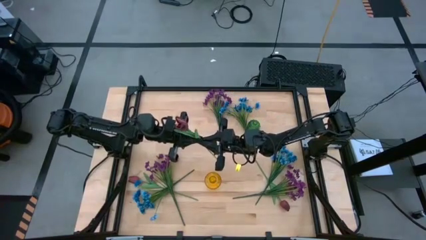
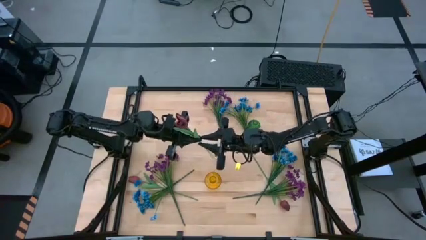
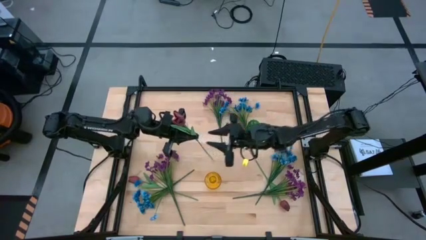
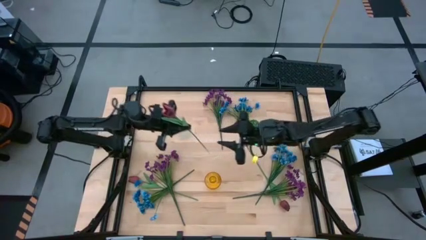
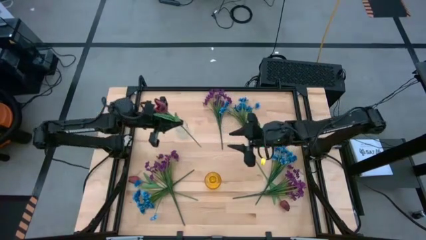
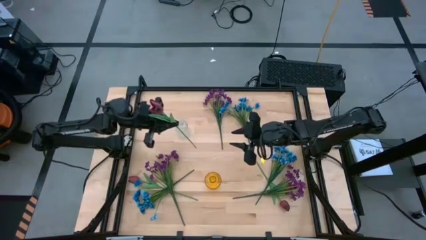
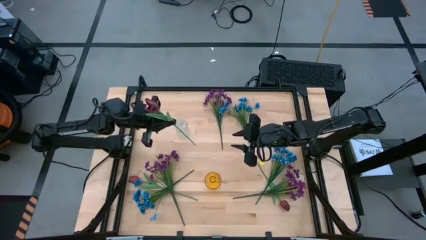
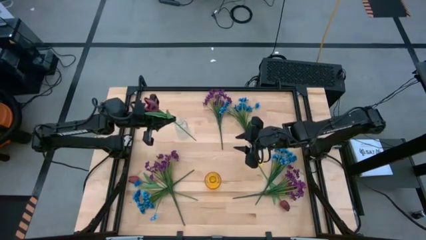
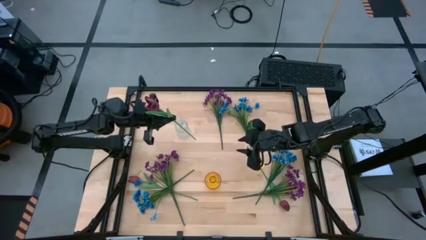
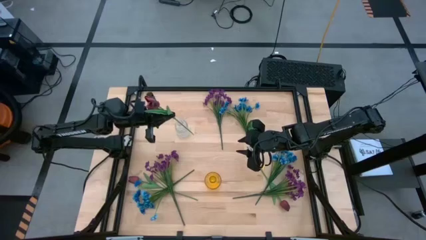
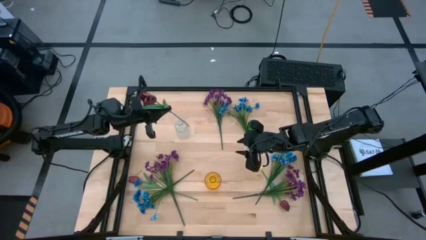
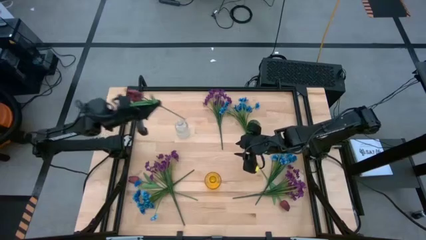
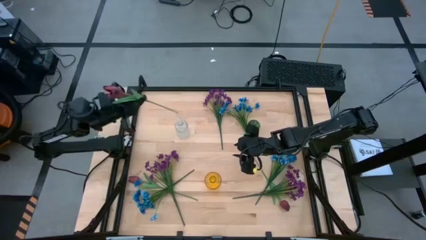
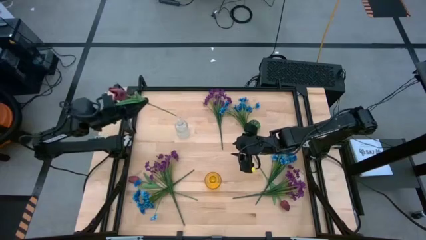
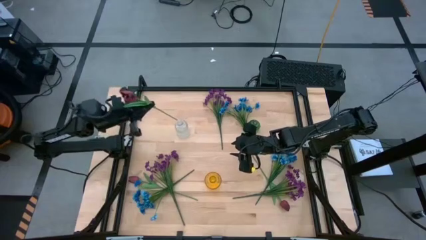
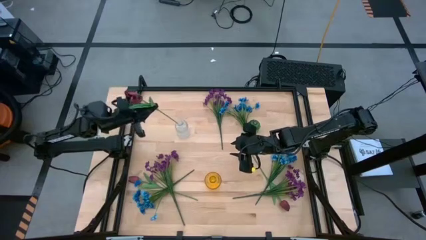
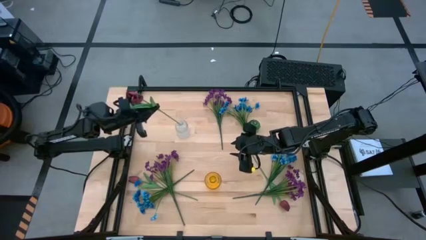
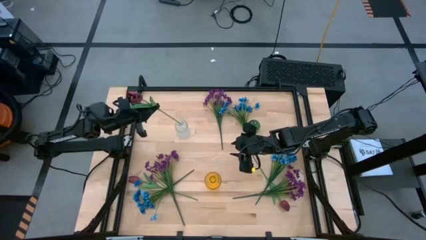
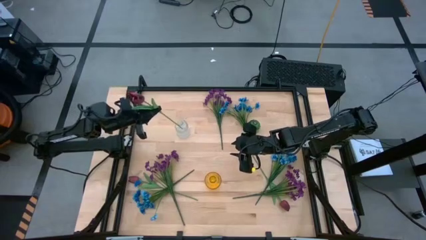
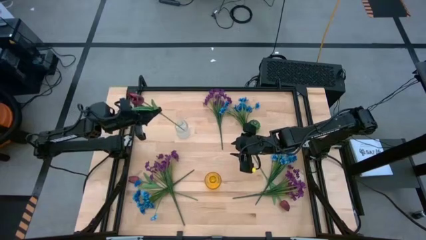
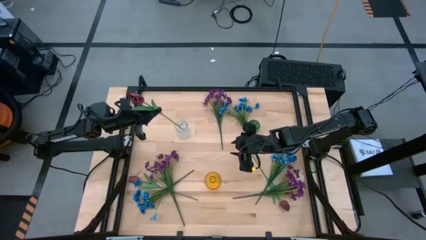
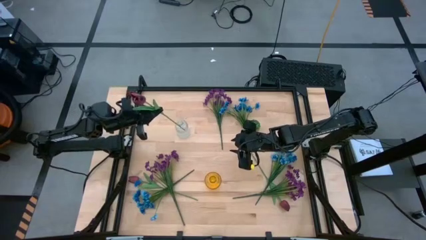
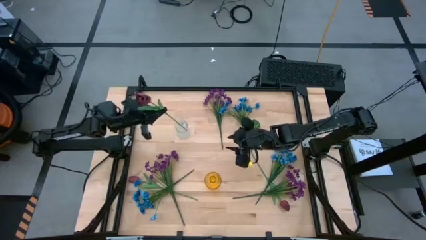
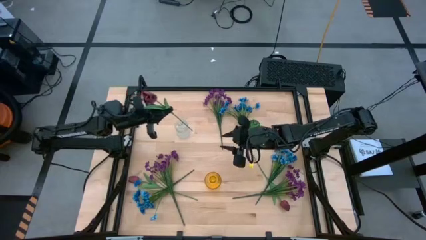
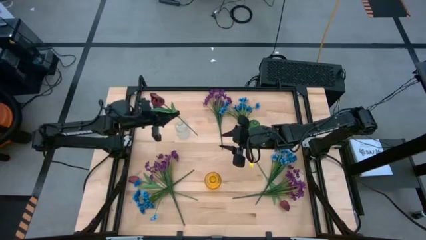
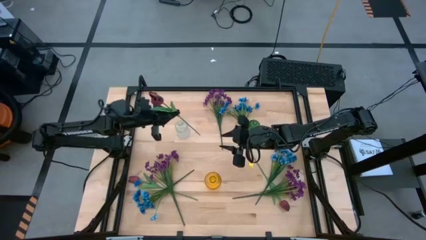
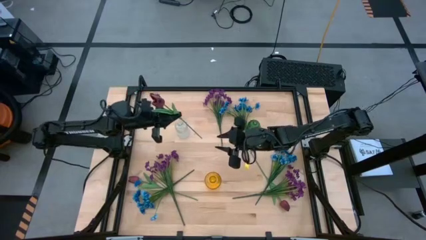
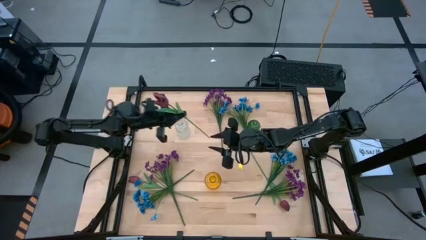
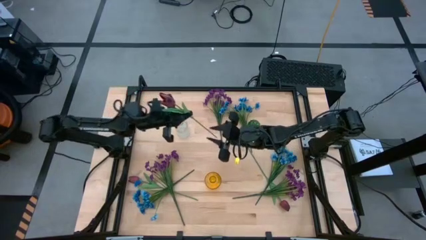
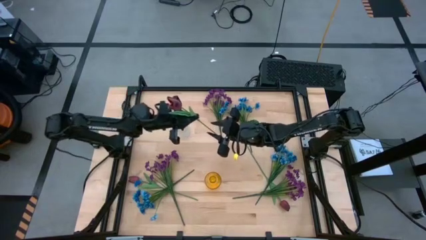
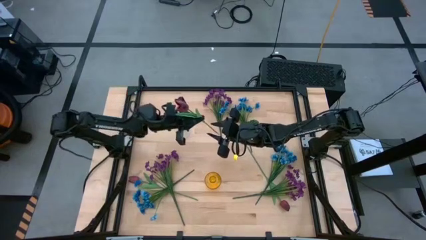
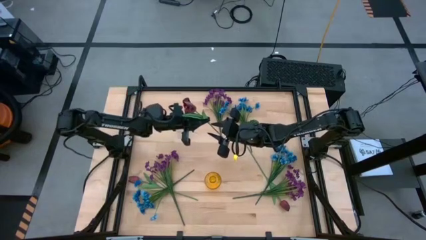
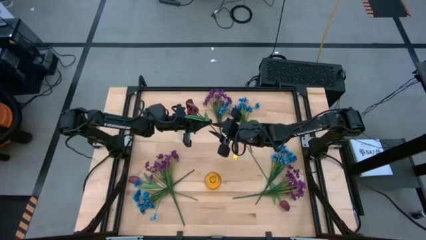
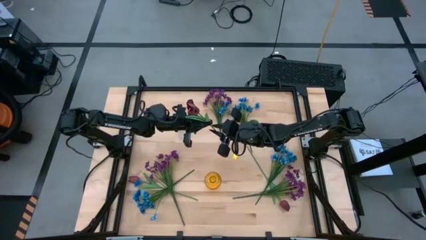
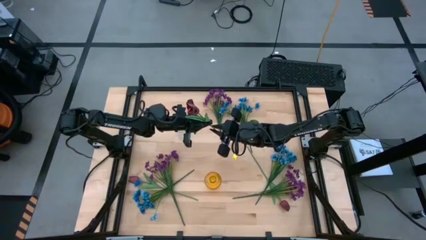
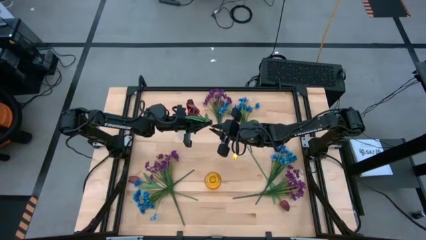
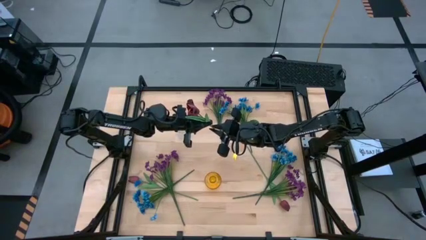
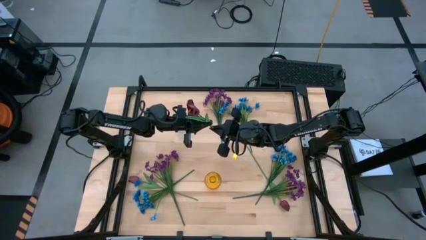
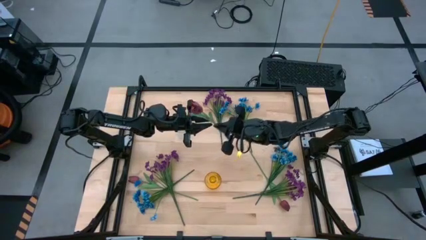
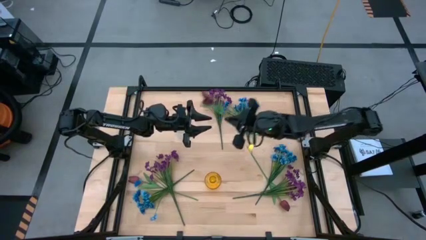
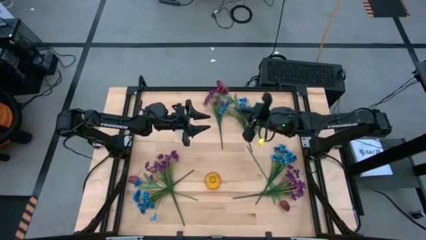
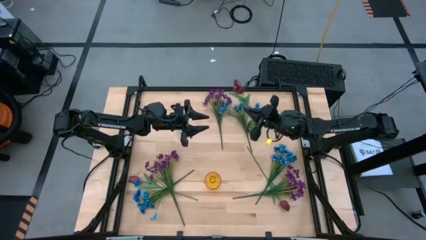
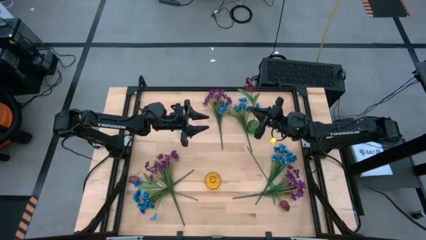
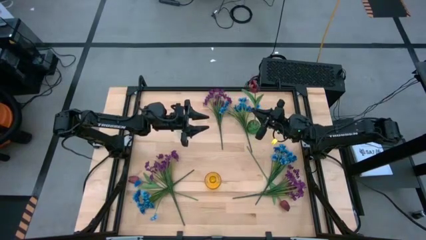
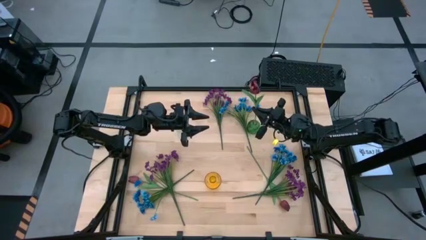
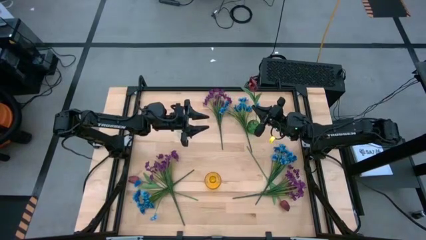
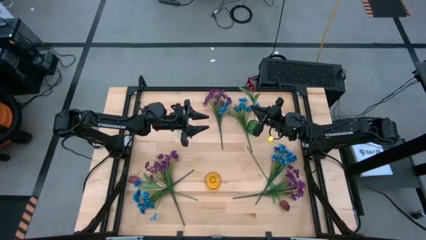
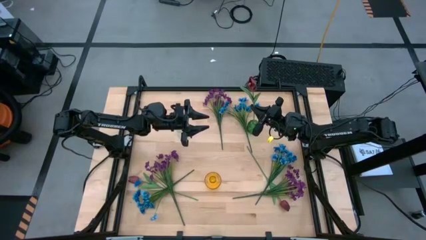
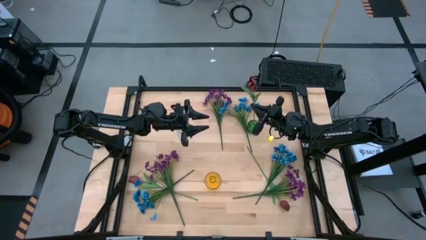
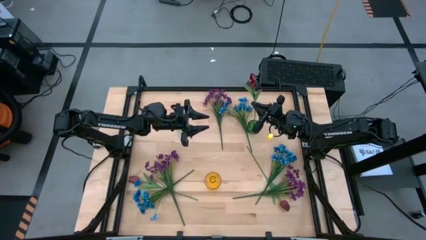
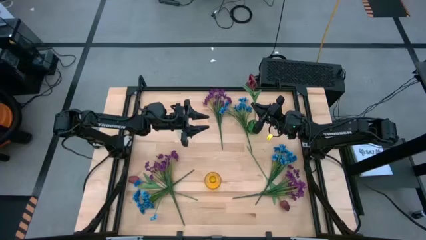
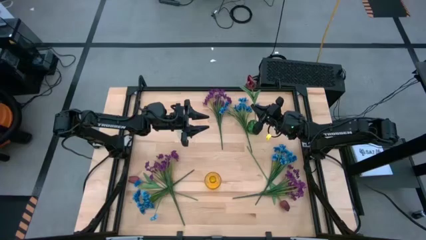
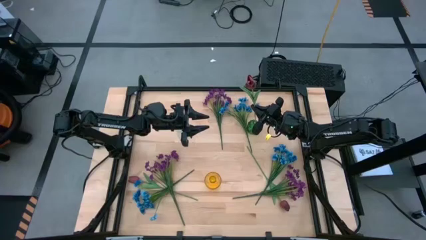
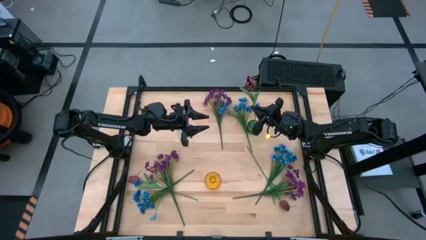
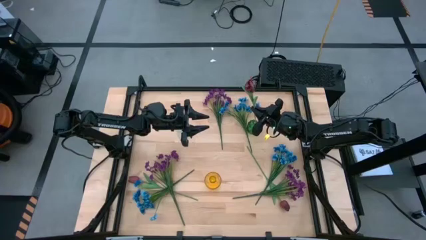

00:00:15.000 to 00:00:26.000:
Task: Sort flowers into vase by color
Put the top red flower into the green vase

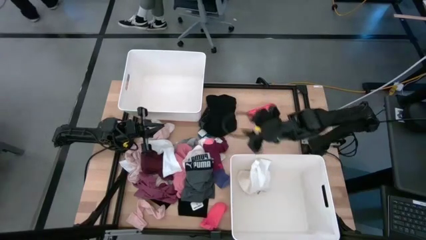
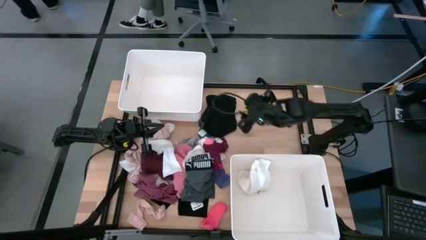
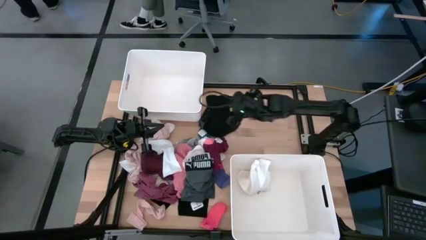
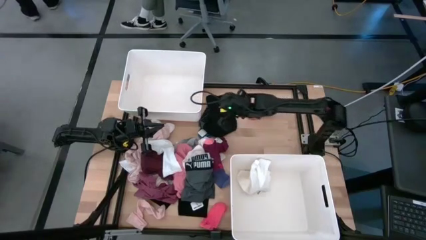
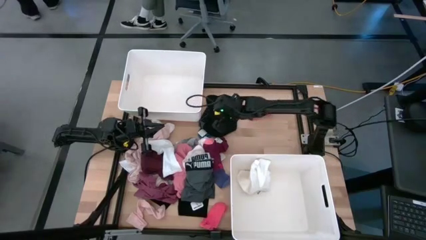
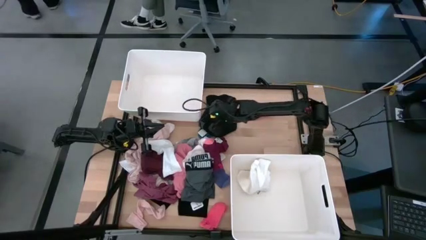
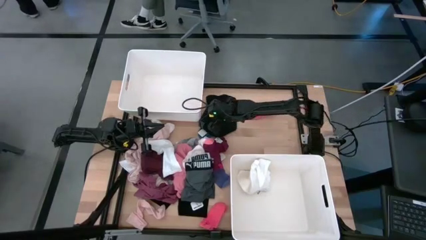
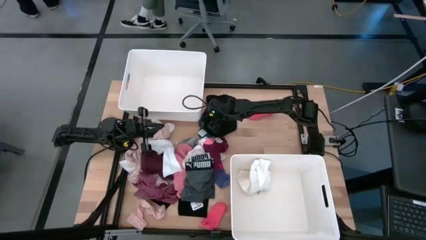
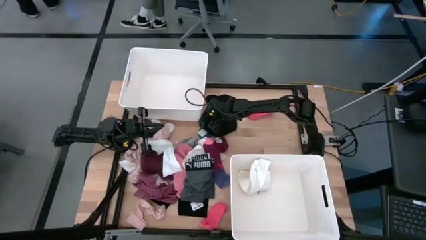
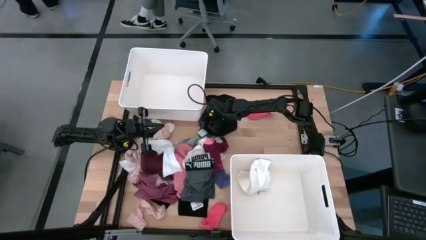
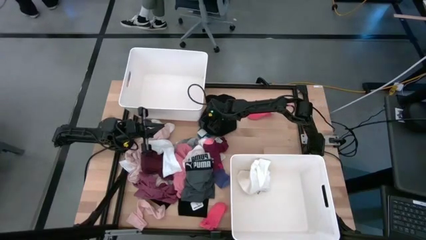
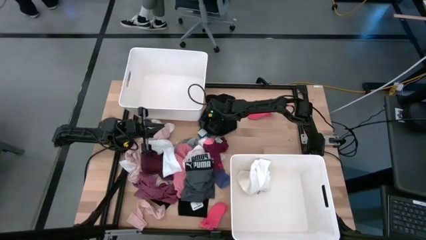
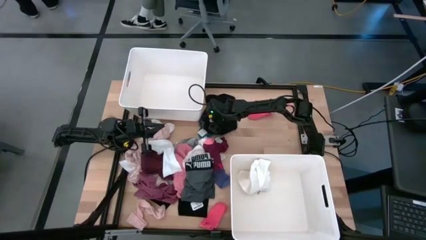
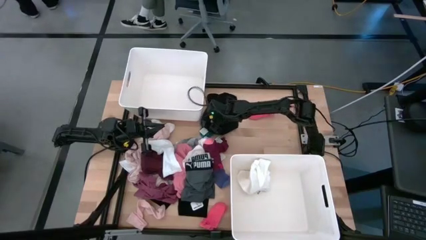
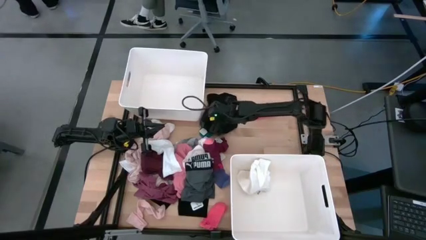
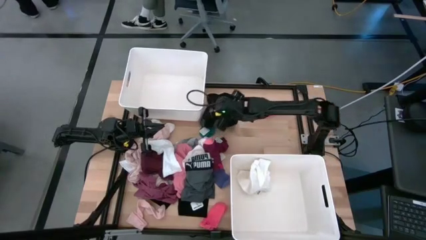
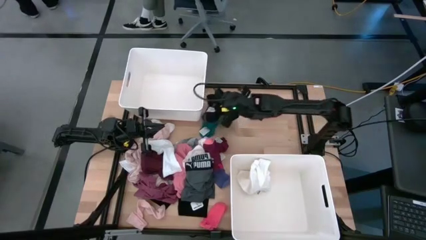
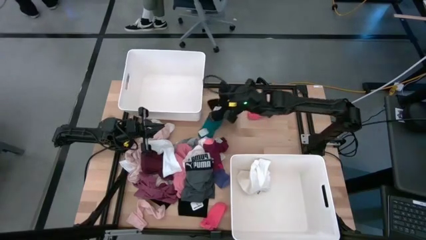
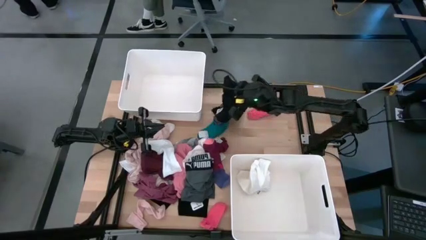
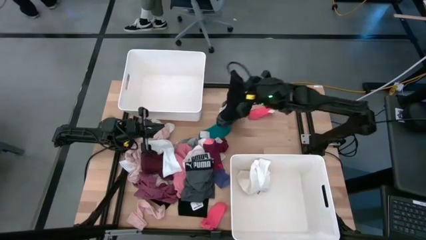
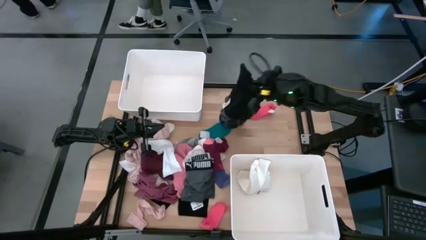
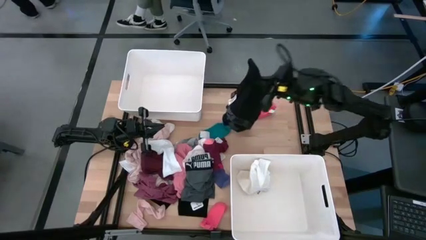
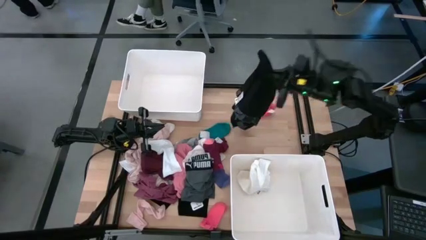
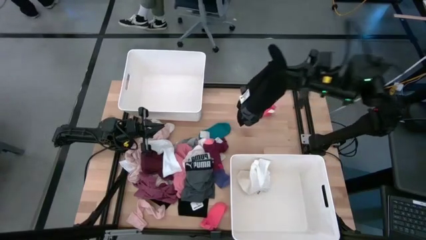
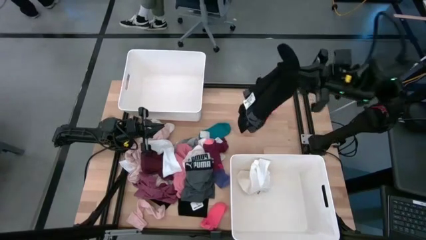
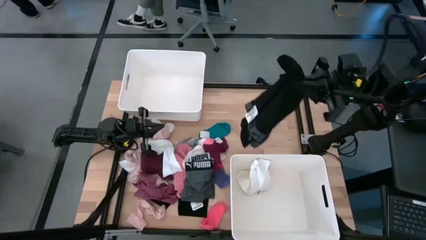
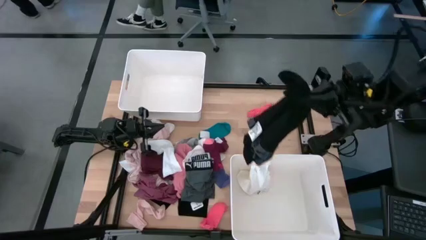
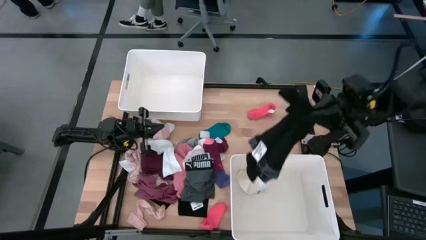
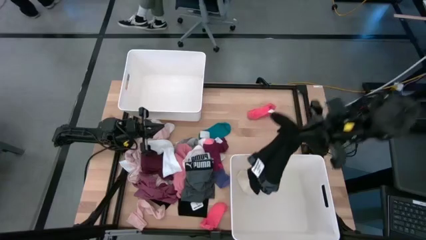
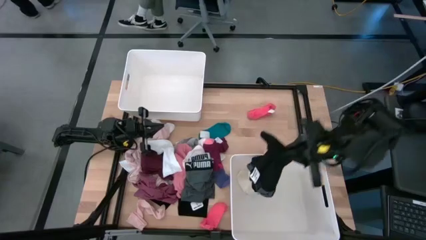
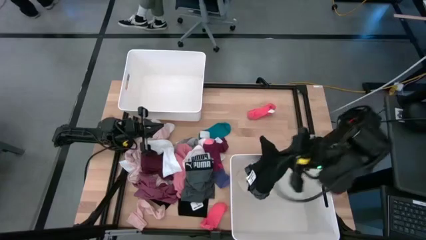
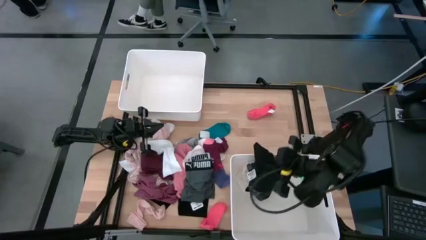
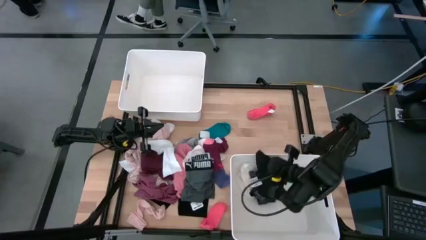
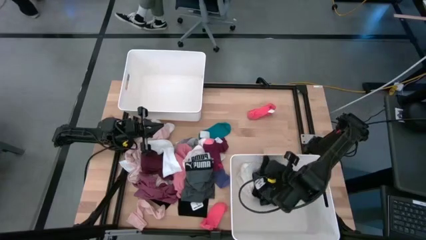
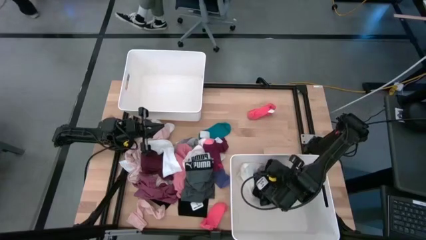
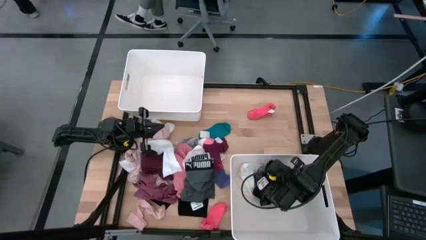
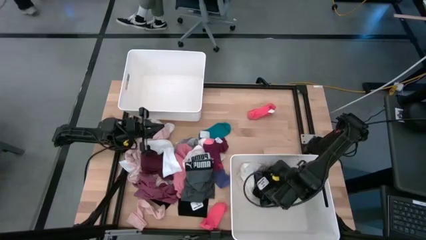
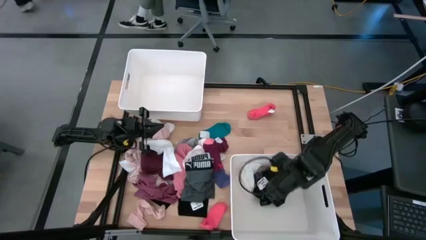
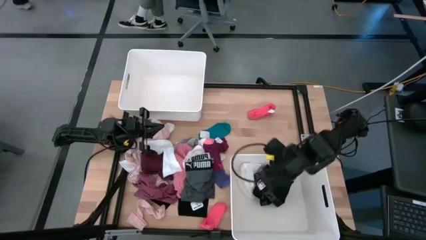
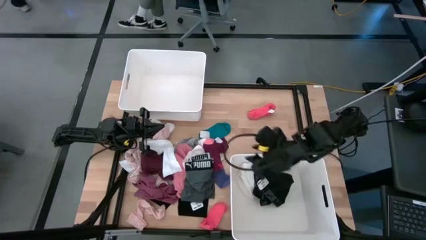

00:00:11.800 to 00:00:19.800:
Task: Sort clothes
Put the black underwear into the bottom white bin
